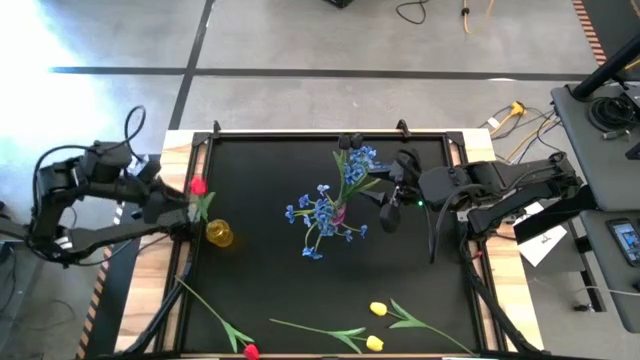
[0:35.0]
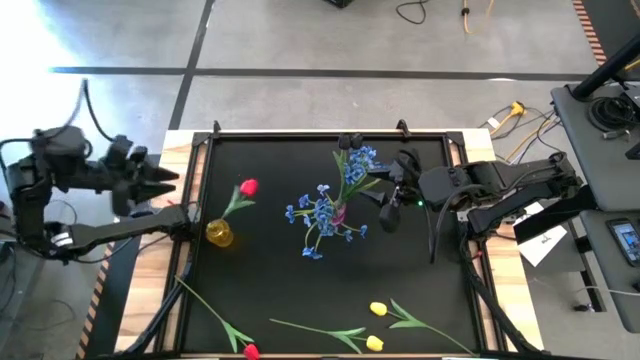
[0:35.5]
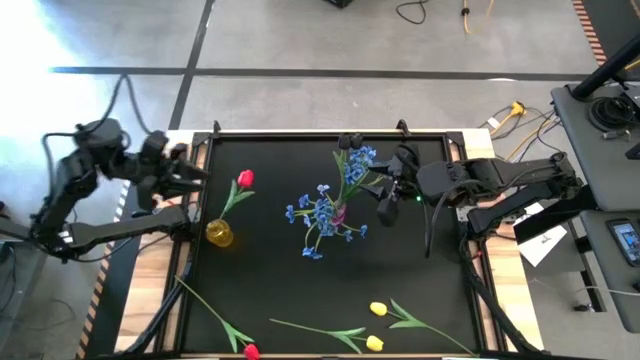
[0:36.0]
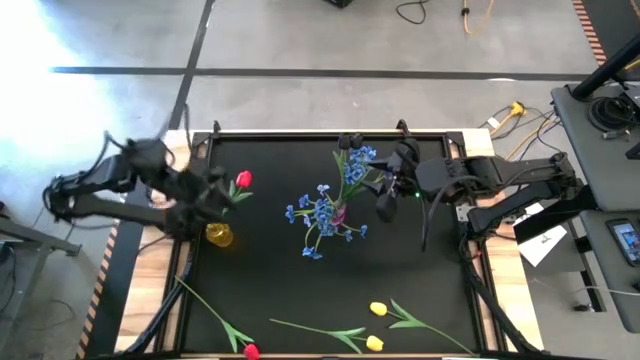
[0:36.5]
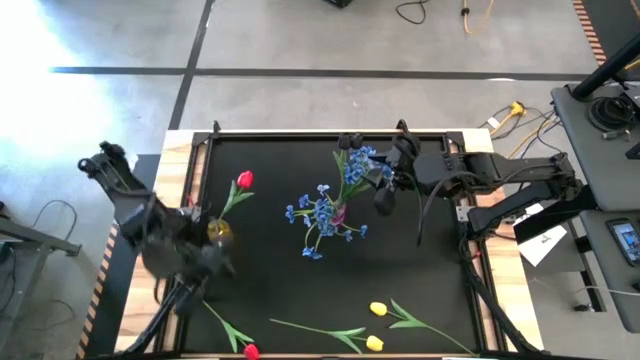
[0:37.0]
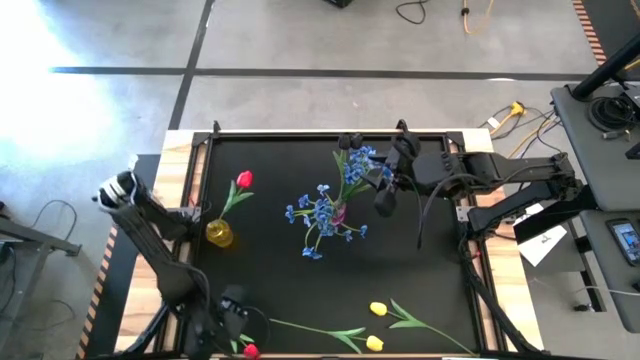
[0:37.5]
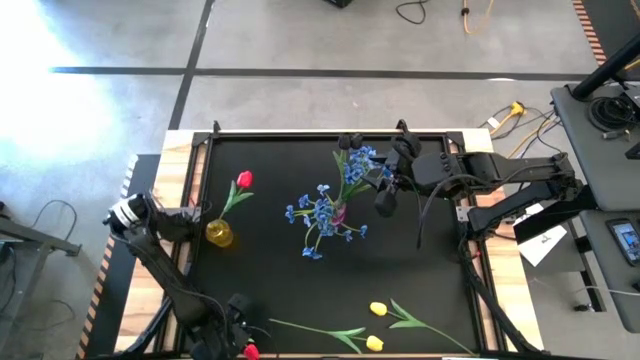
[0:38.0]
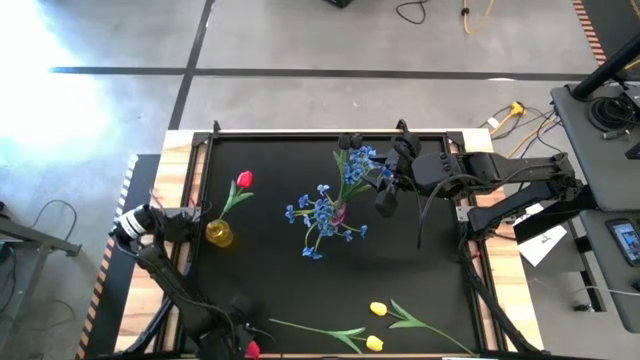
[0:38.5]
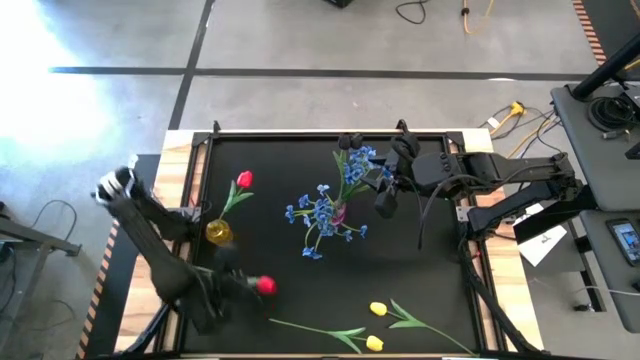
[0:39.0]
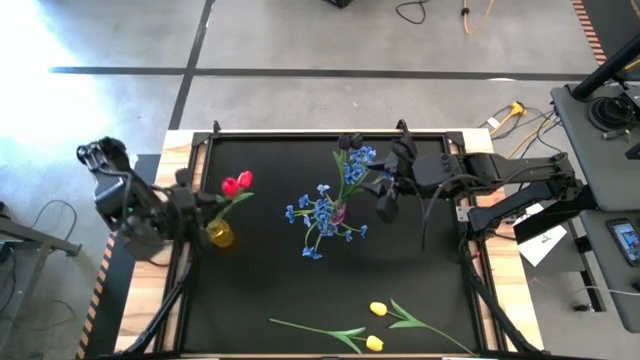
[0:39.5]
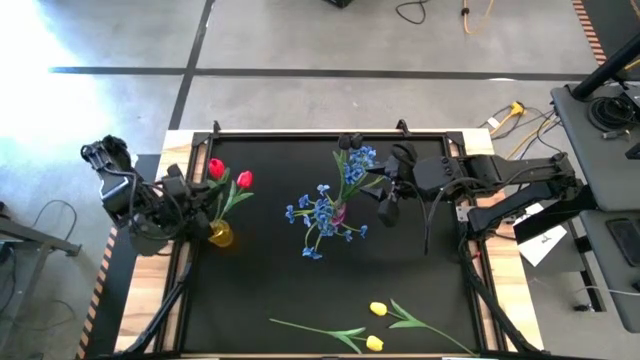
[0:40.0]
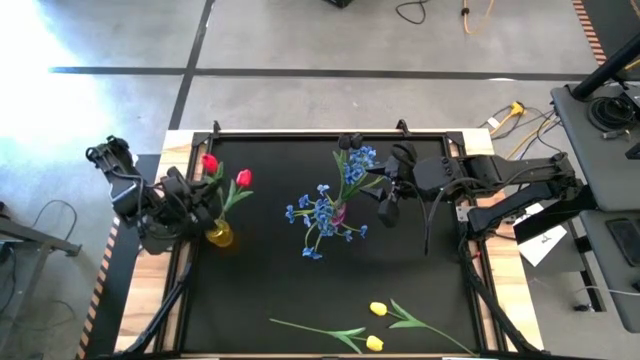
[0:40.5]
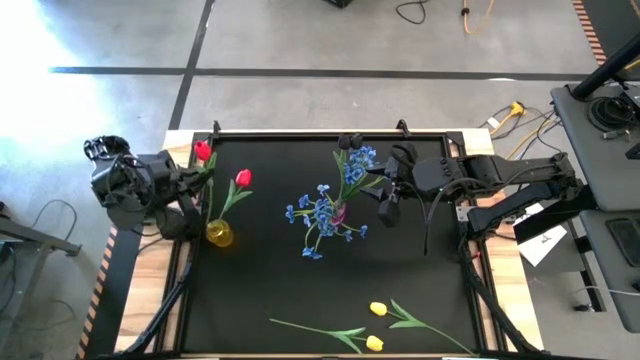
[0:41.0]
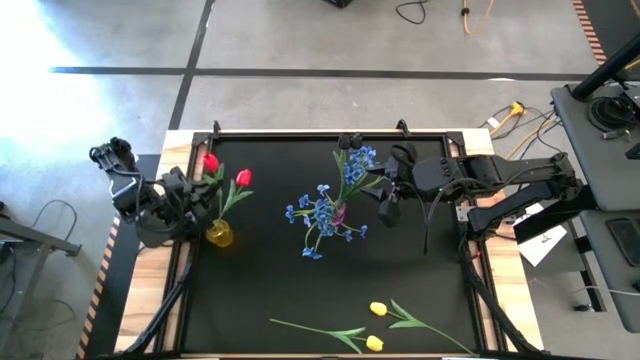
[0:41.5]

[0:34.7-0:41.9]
Task: Sort flowers into vase by color
Put the red flower into the yellow vase

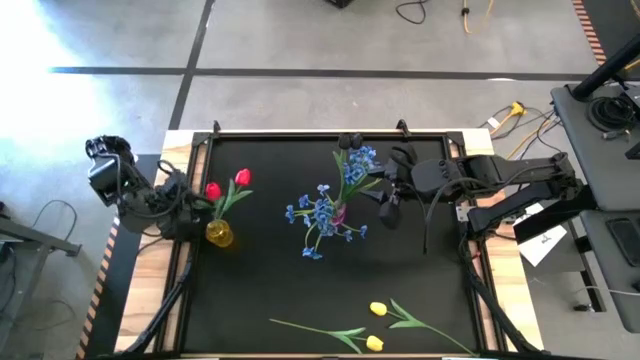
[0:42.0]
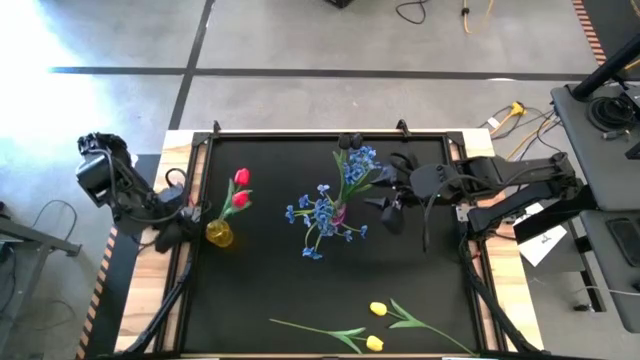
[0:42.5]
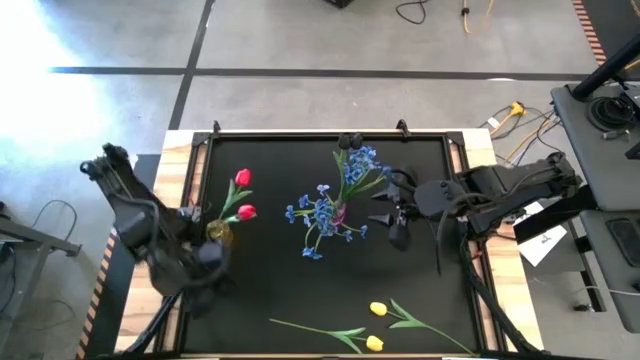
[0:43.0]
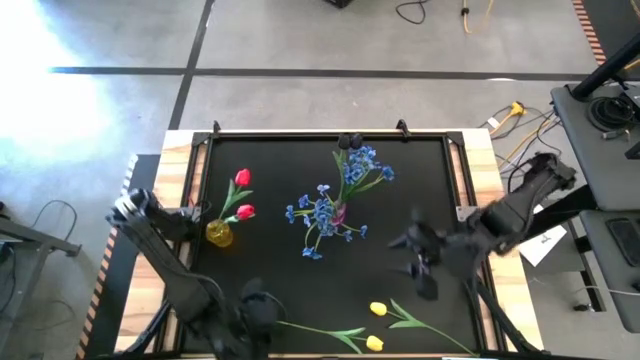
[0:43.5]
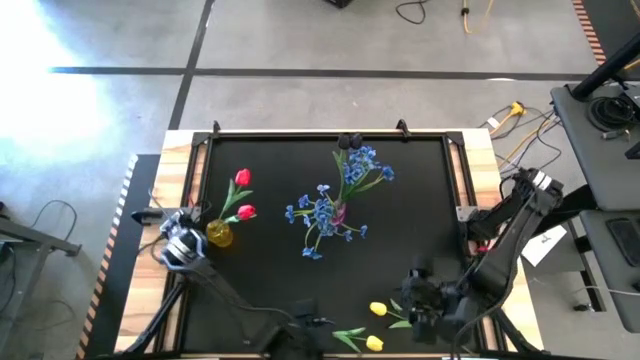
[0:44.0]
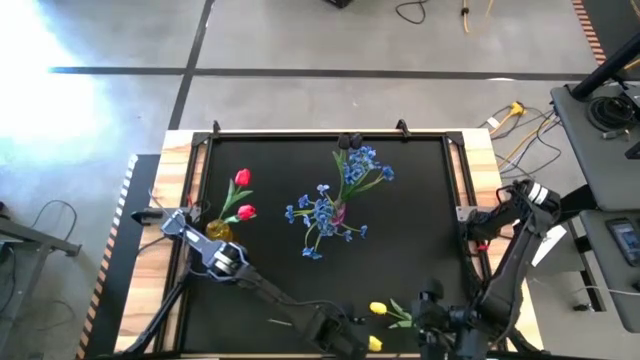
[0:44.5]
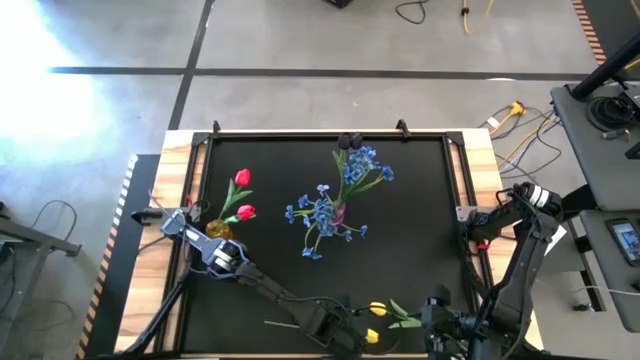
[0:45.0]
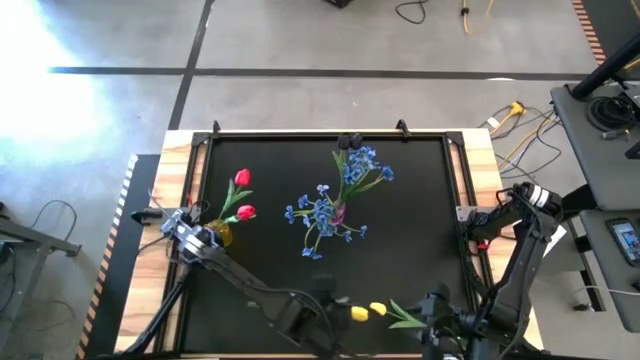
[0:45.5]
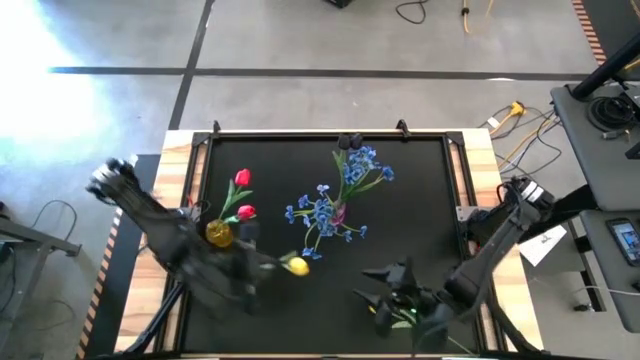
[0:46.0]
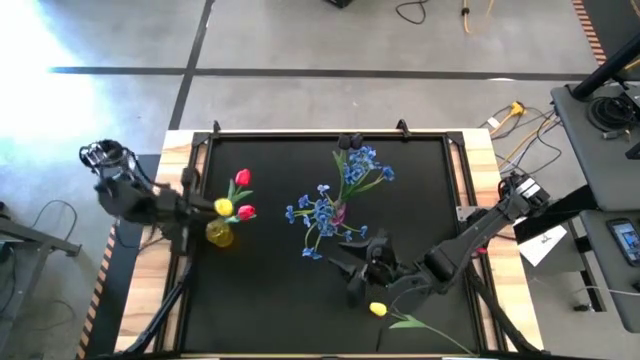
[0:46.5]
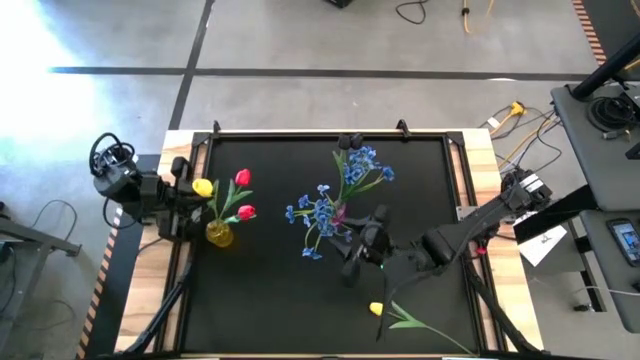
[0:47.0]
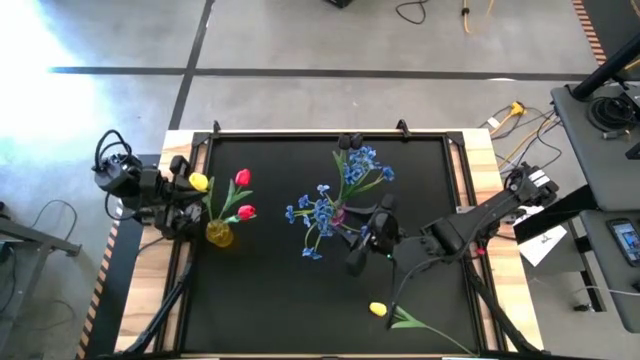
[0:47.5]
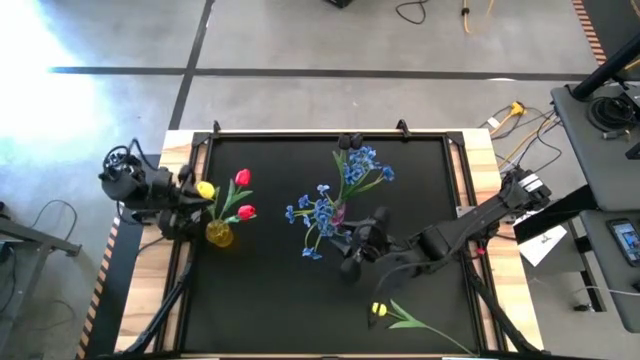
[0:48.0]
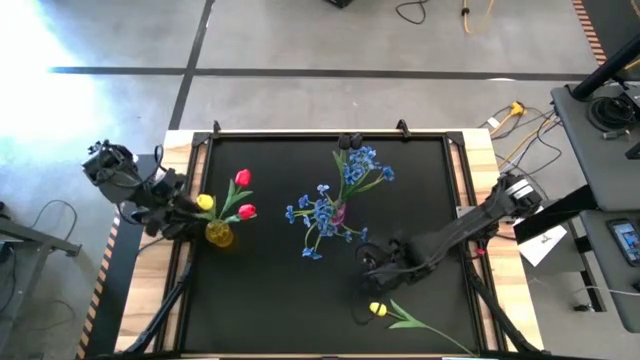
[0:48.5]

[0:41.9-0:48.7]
Put the bottom left yellow flower into yellow vase

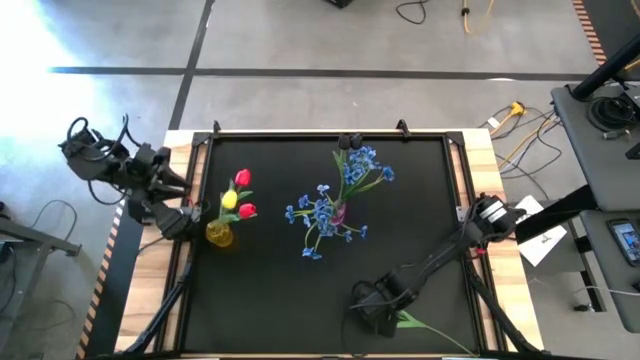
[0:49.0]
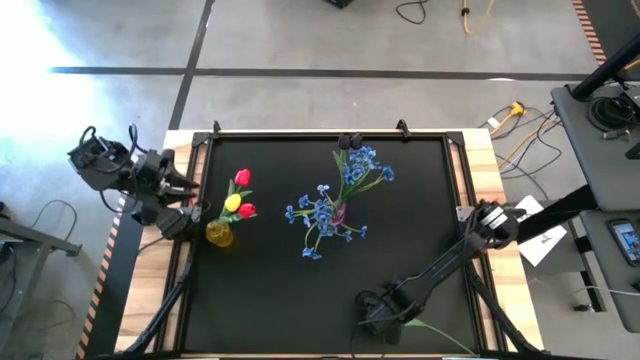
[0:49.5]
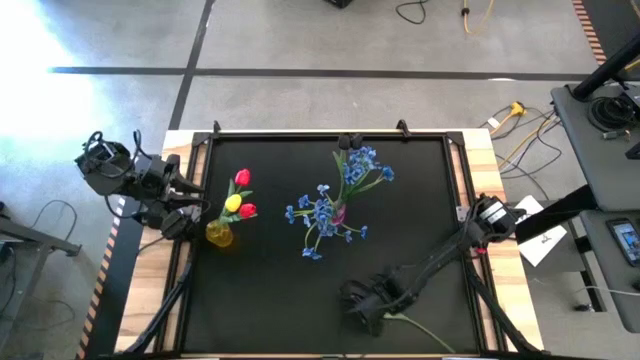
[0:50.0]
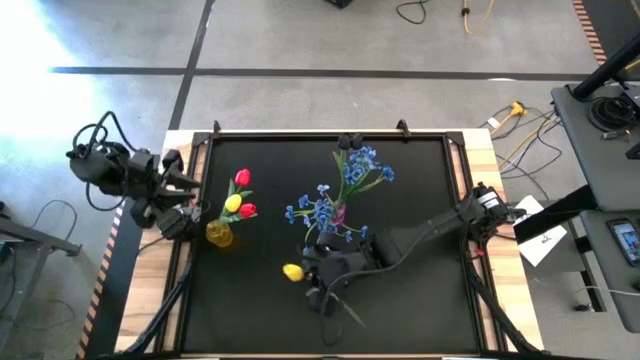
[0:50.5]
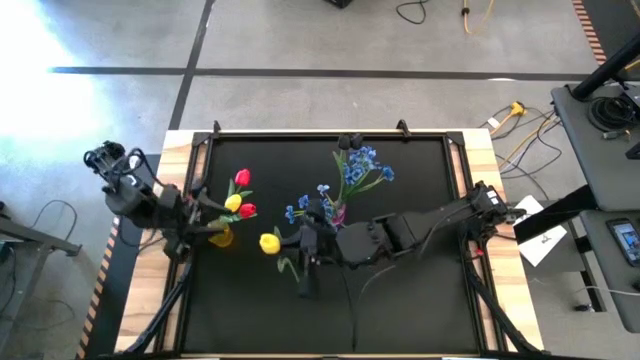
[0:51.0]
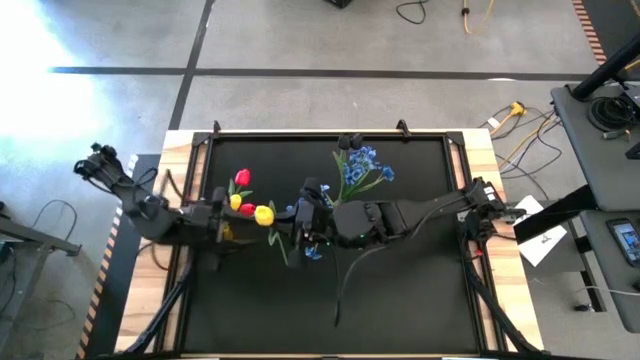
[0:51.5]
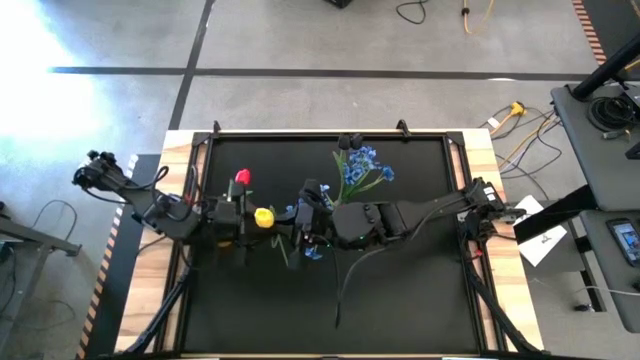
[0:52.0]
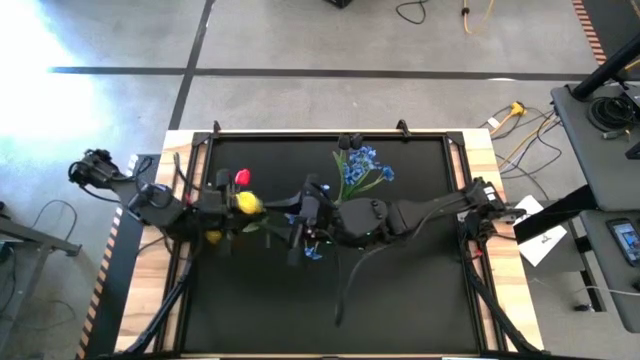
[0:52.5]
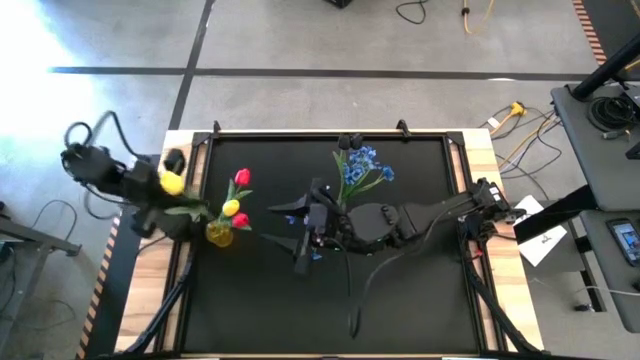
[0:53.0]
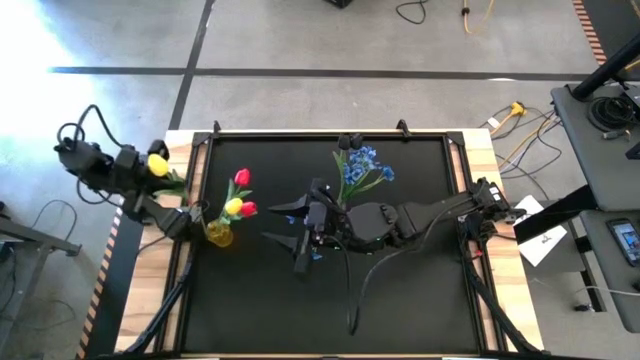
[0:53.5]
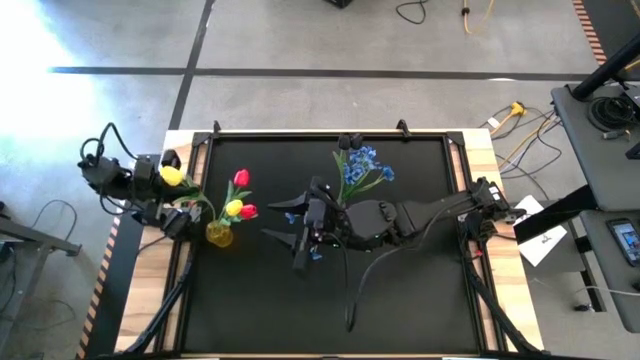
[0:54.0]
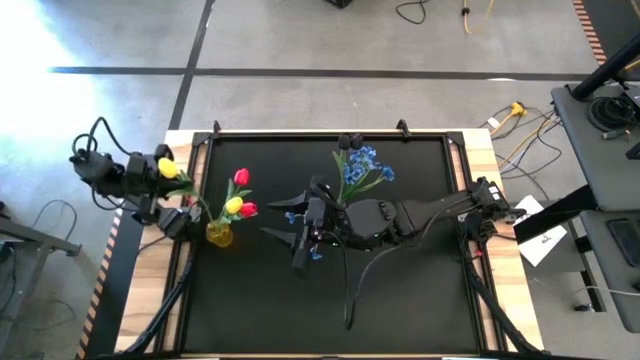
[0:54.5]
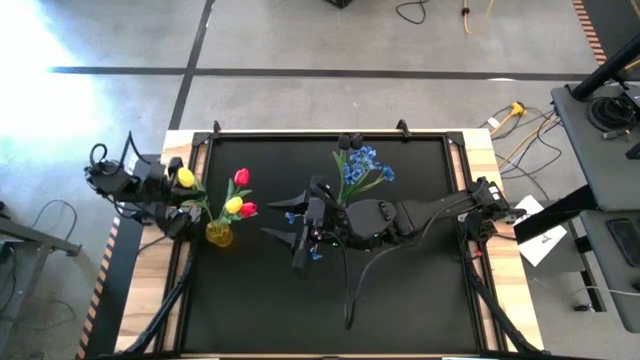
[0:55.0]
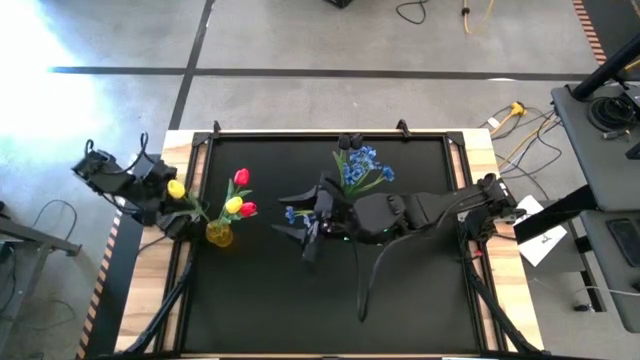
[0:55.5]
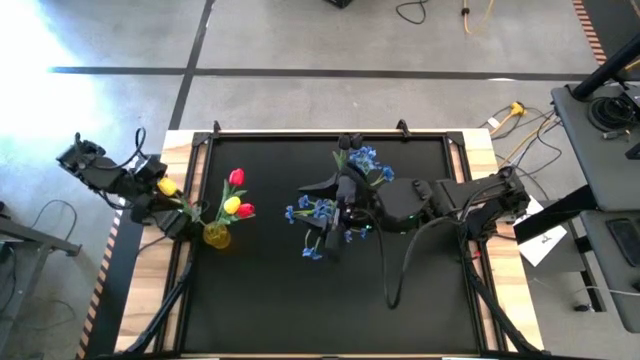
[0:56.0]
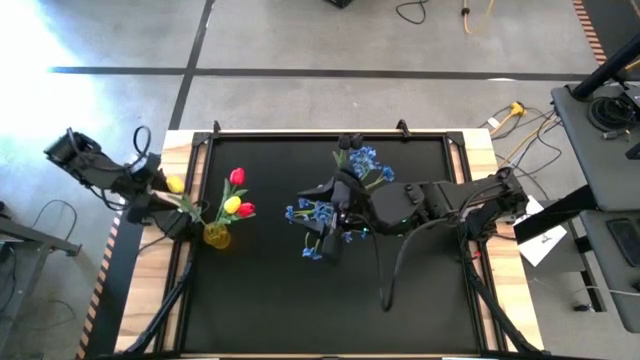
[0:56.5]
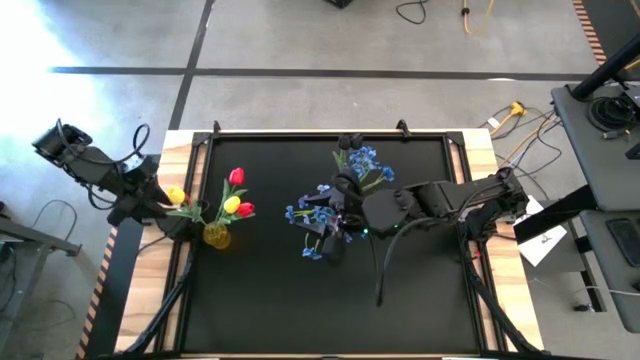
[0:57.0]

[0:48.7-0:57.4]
Put the yellow flower into the yellow vase
